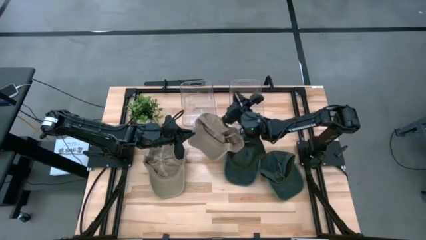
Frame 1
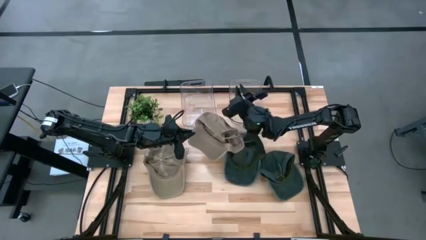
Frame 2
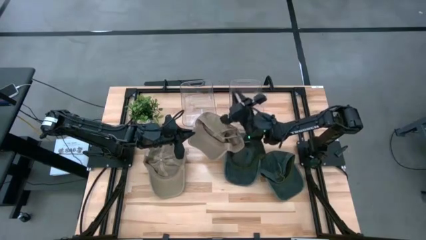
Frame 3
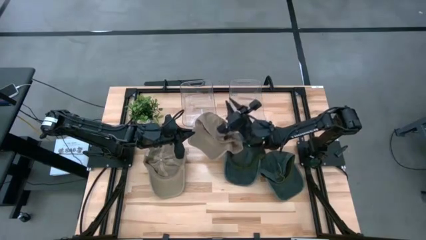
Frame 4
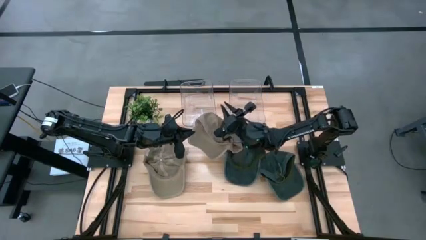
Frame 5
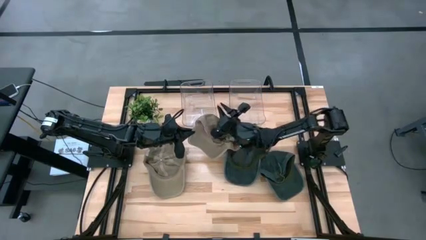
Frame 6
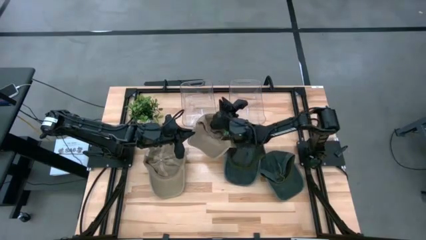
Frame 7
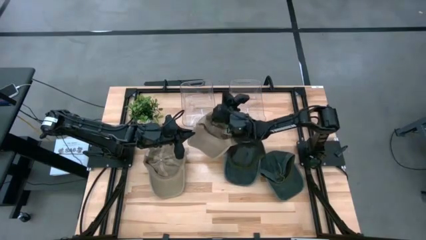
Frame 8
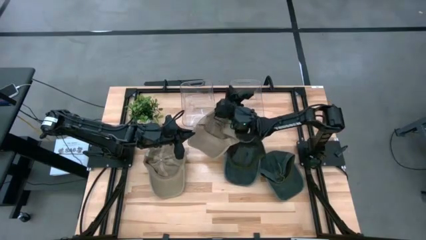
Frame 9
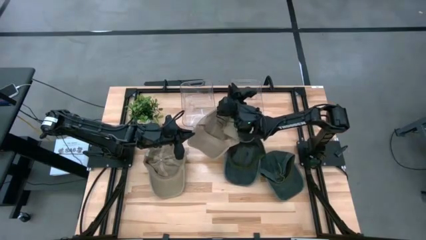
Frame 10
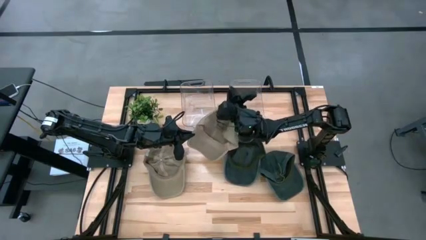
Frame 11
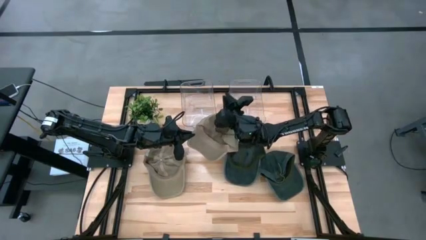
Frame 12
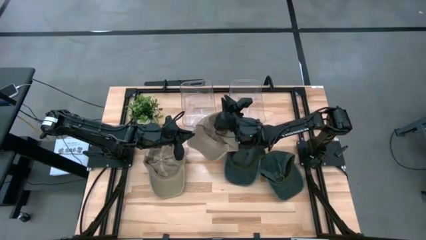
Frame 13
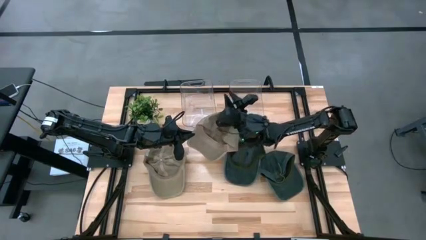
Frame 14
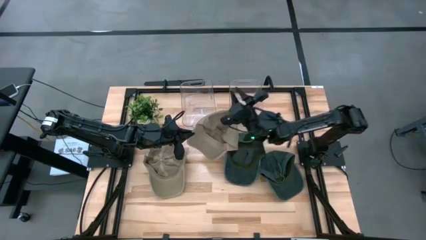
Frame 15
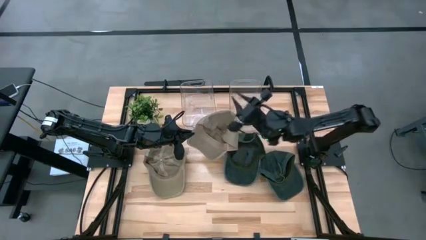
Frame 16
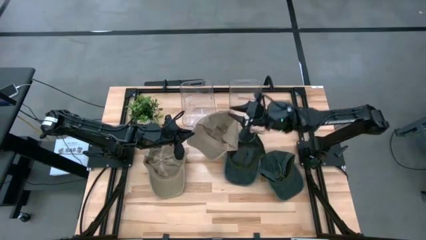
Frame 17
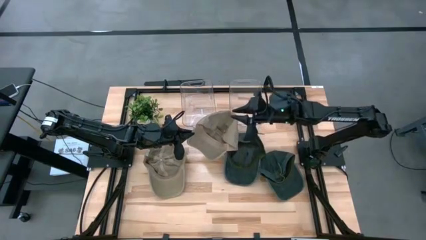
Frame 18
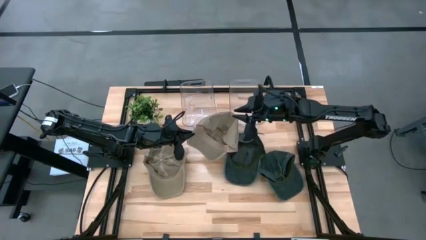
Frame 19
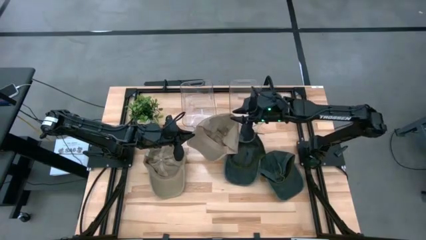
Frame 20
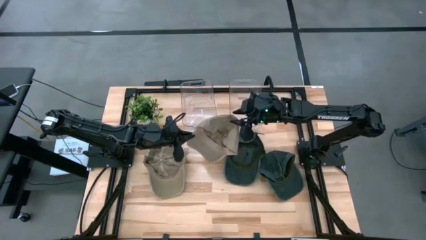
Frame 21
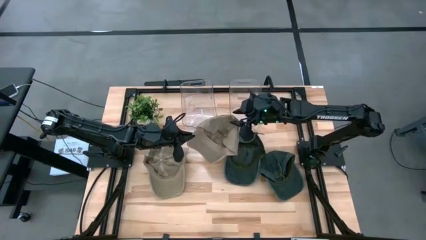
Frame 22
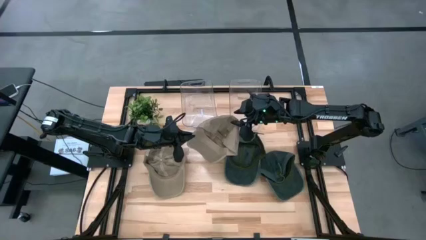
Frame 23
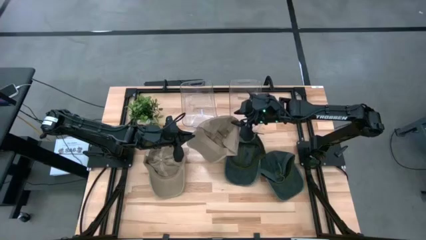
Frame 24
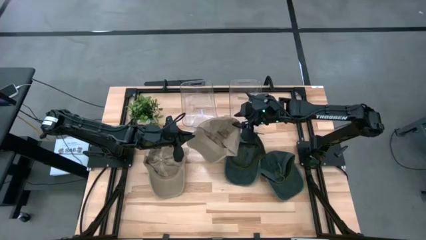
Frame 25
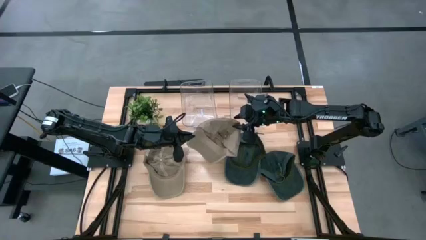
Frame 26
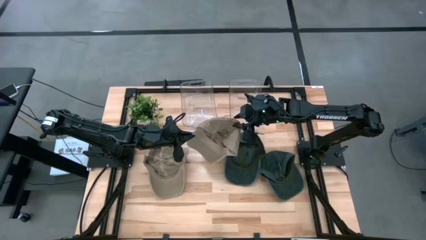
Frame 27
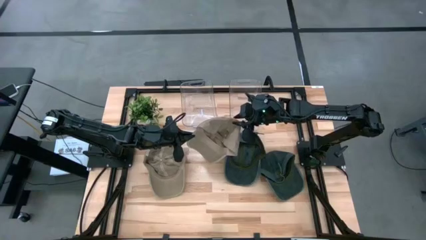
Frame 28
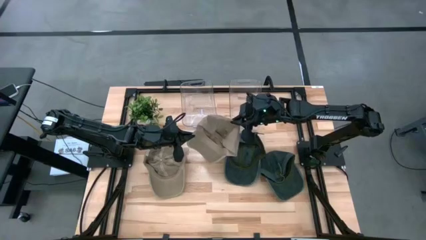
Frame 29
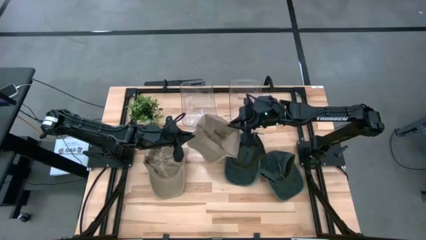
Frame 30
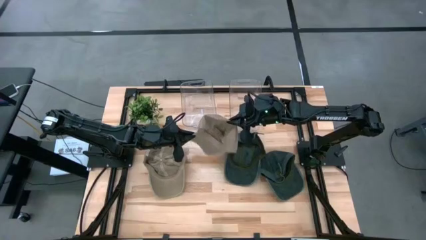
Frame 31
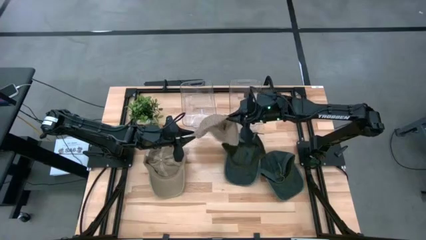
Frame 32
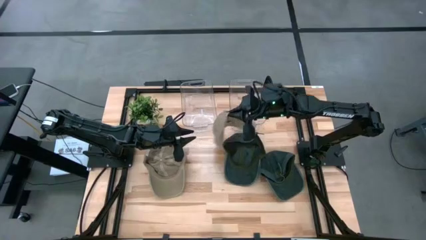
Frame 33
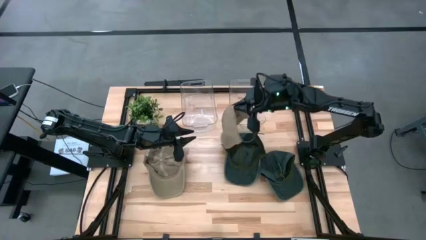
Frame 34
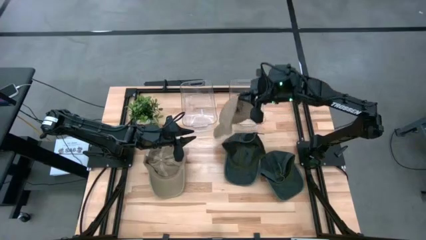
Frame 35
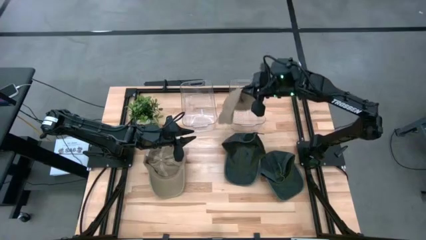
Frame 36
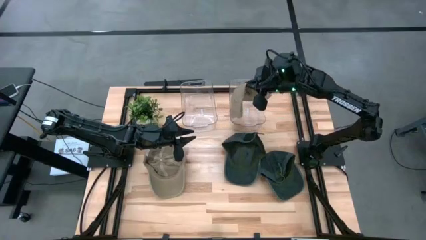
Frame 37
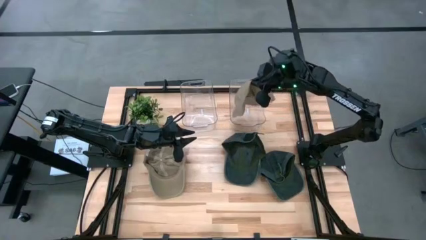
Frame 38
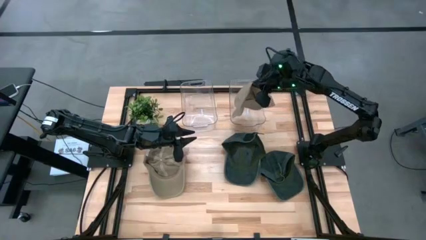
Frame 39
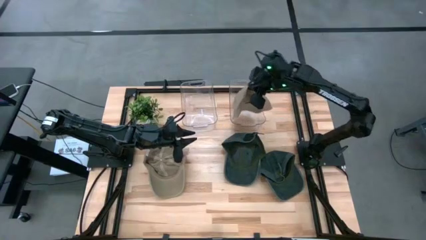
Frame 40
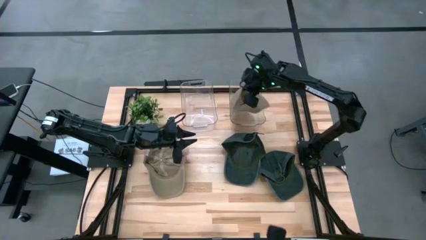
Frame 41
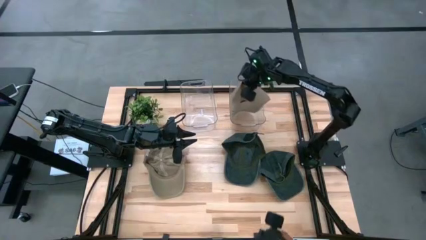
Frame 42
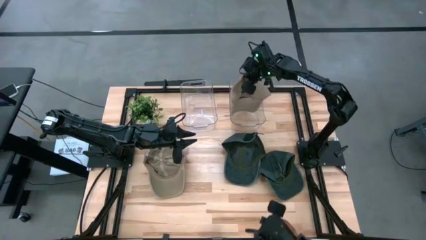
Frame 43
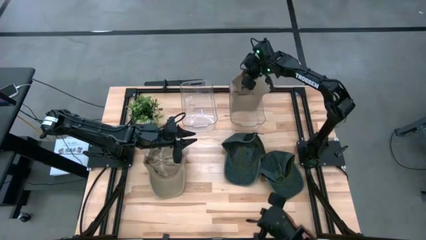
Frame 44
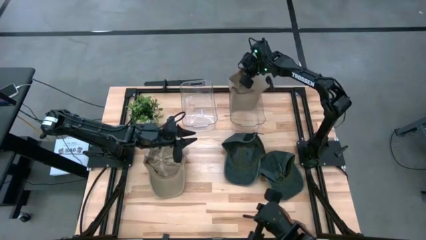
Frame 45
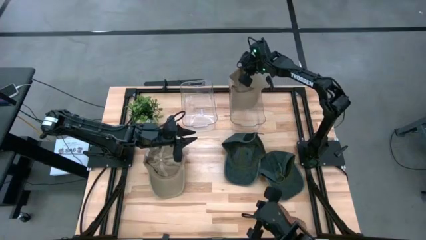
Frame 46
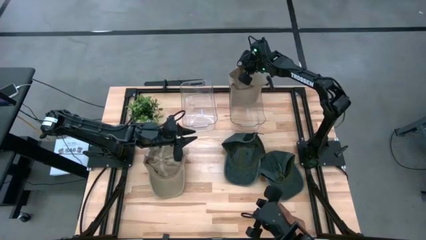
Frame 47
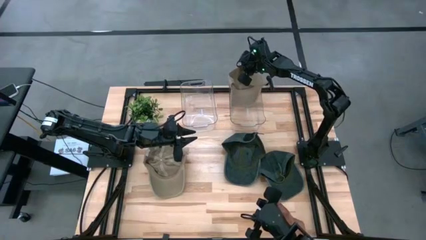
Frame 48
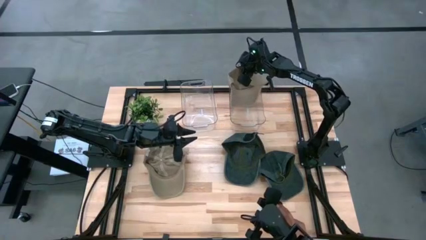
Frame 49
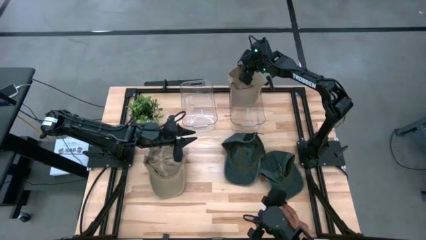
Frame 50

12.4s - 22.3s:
Task: Pick & Place hat
Put the right brown cap into the right transparent bin
